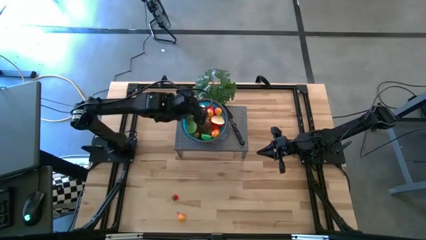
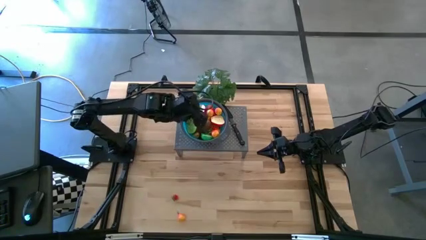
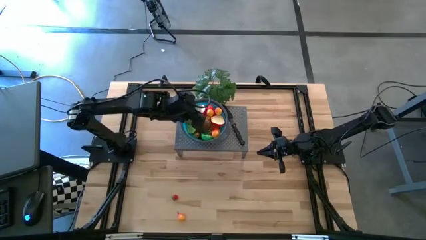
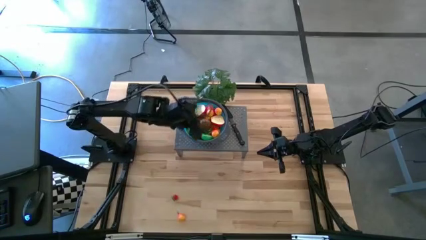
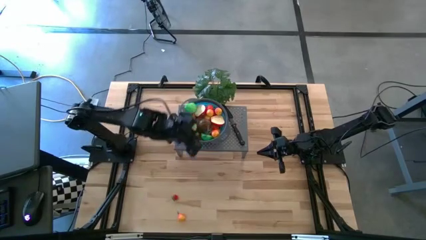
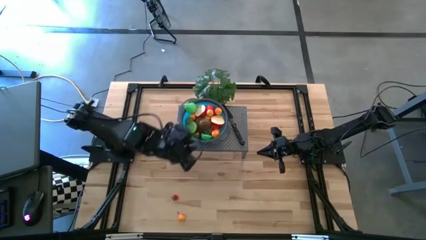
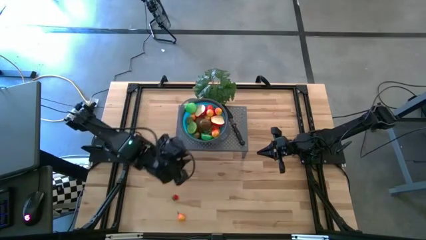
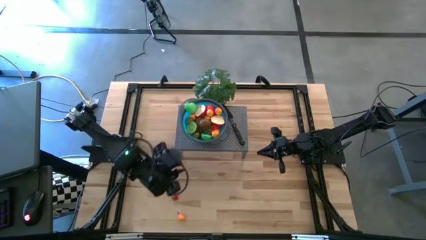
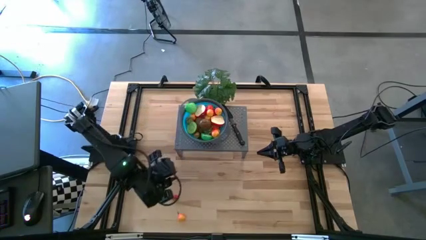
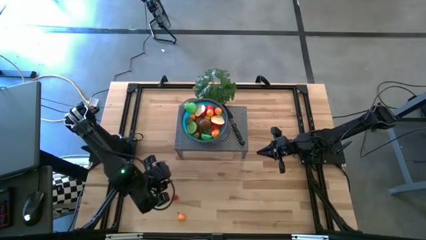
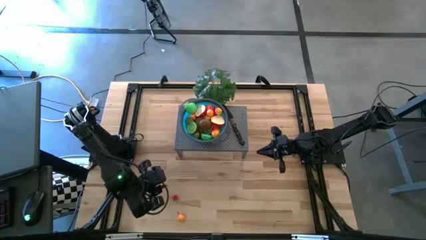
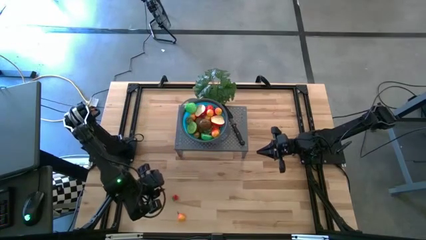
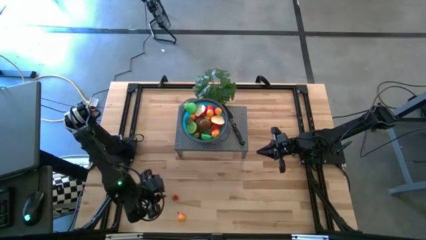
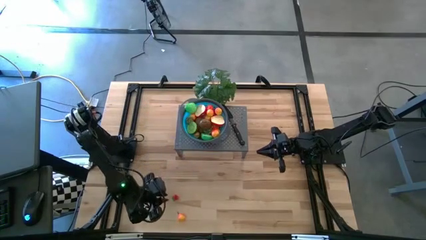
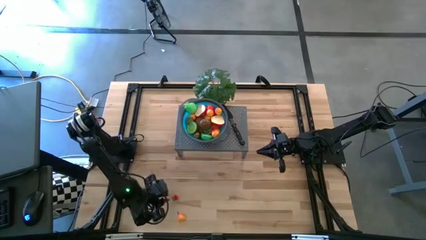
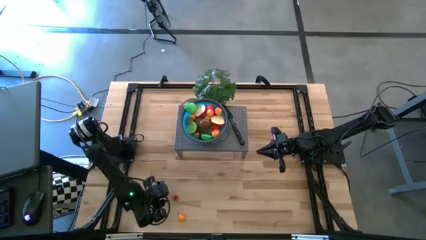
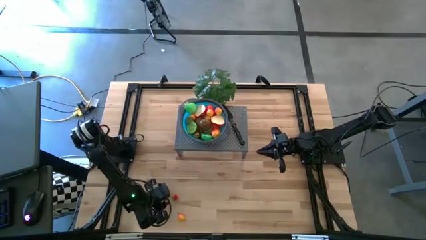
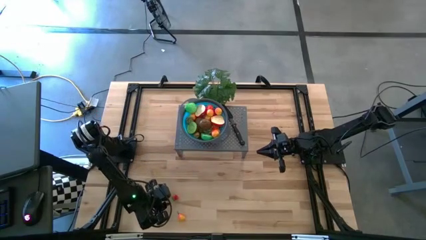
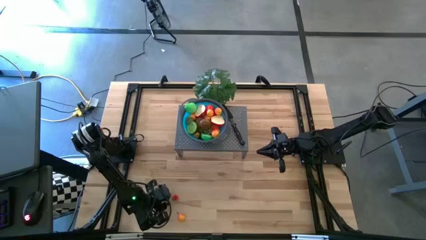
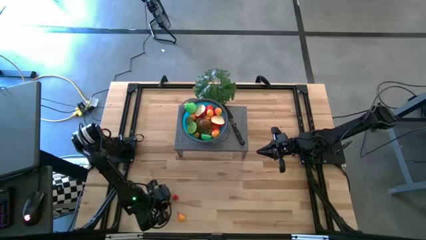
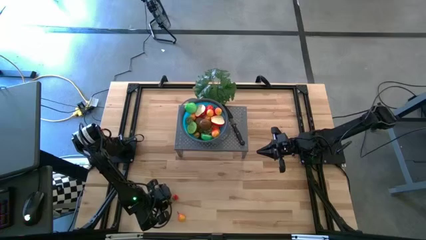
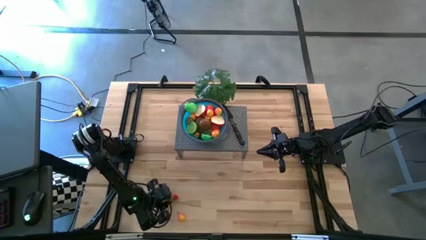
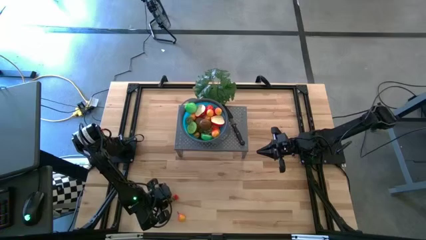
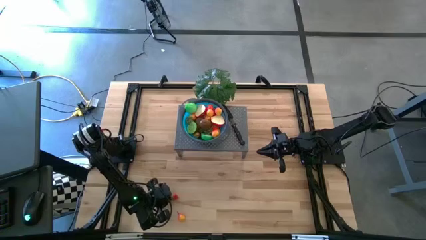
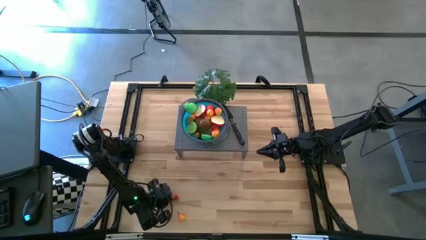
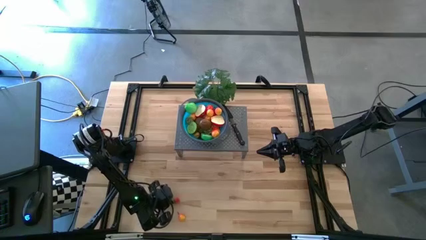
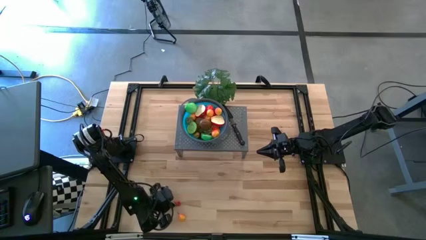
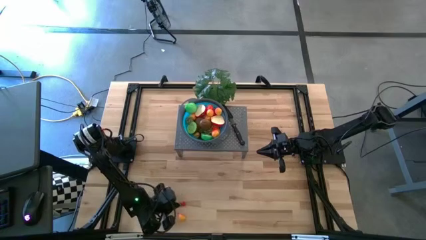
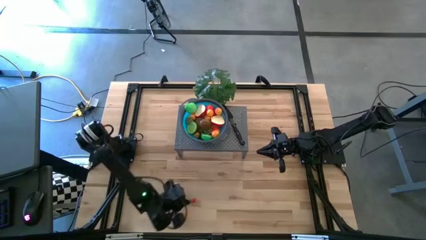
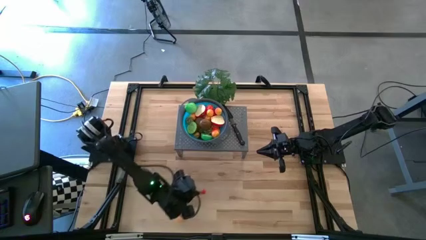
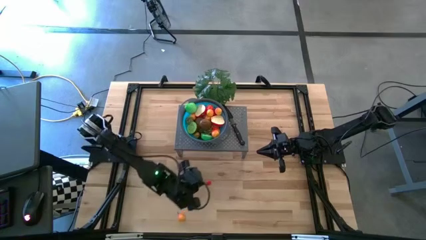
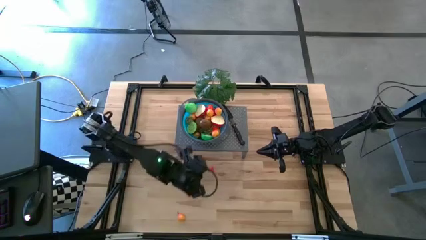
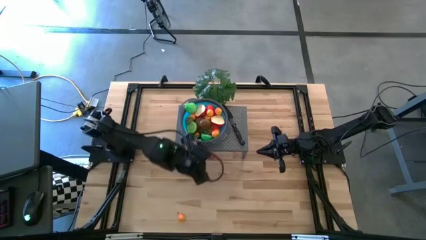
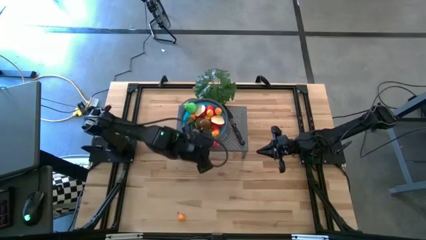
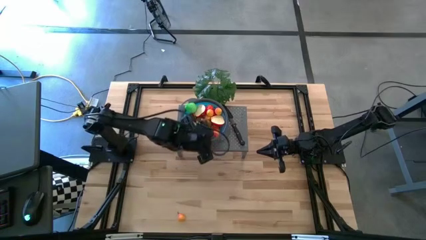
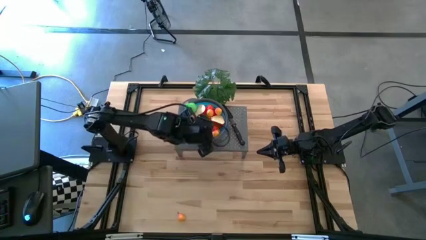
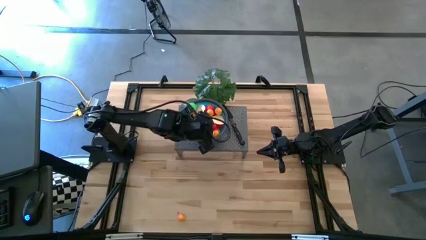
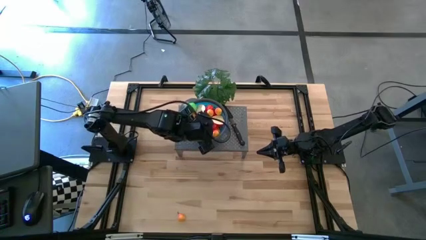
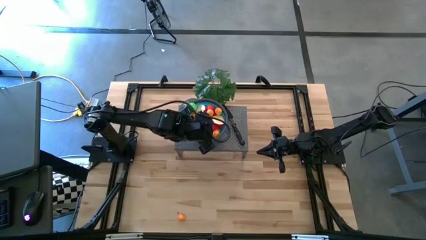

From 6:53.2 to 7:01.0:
Task: Pick & Place Fruit
Put the strawberry into the blue strainer bowl on the shelf

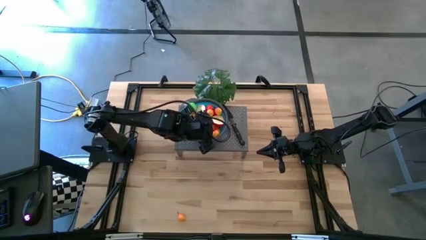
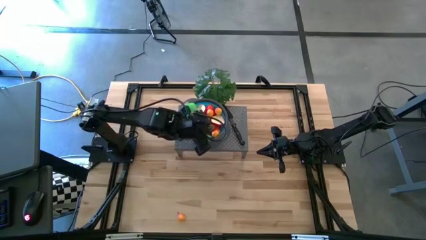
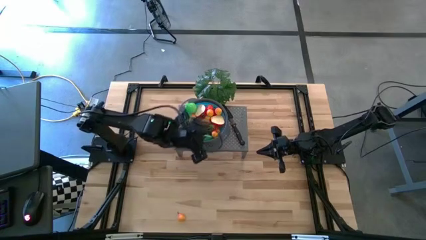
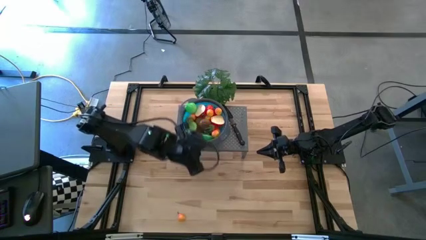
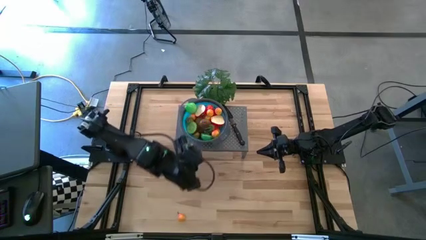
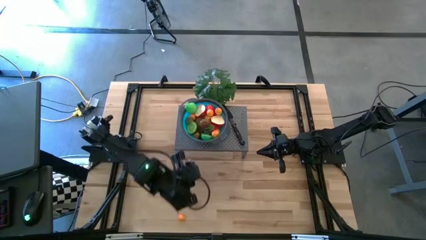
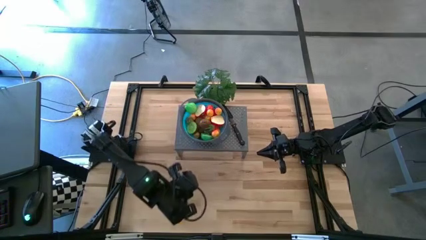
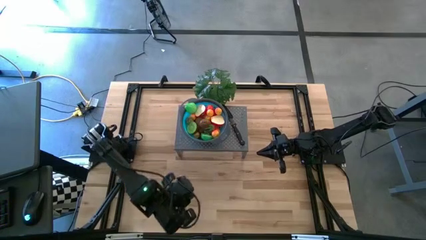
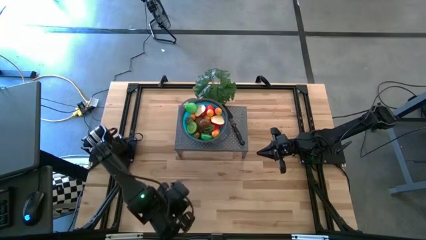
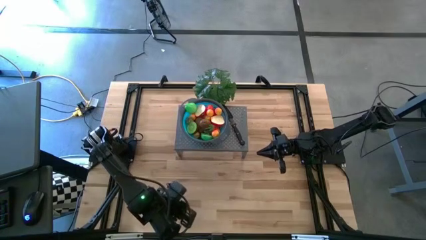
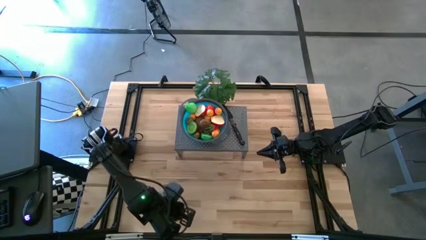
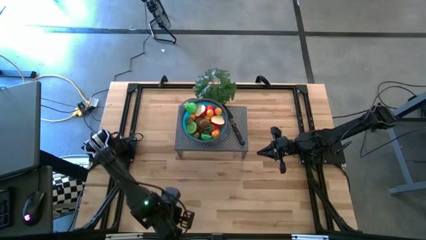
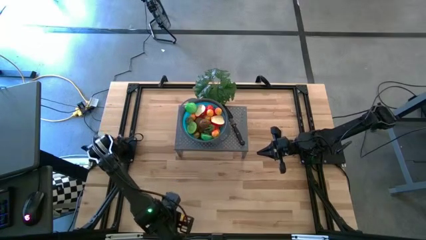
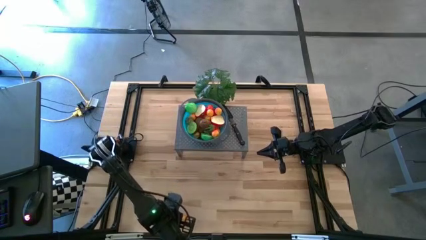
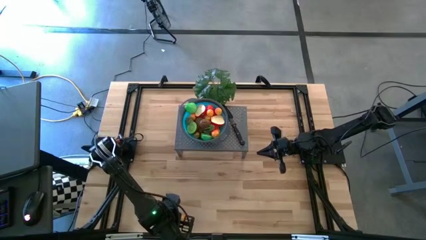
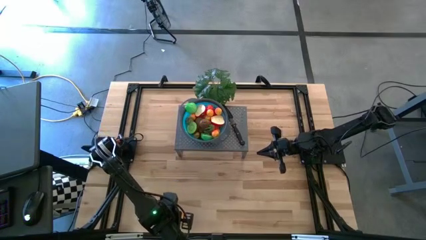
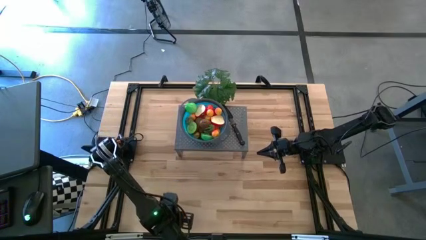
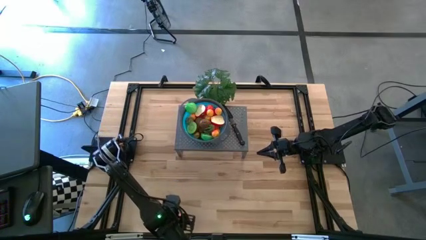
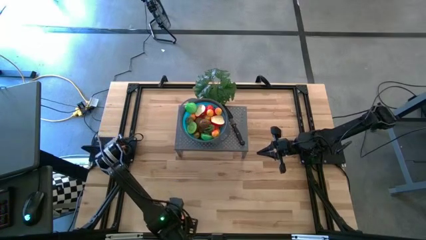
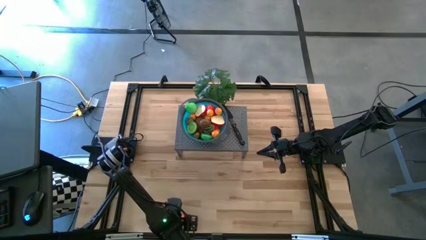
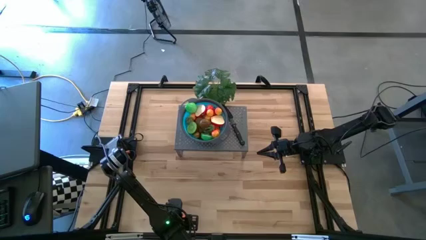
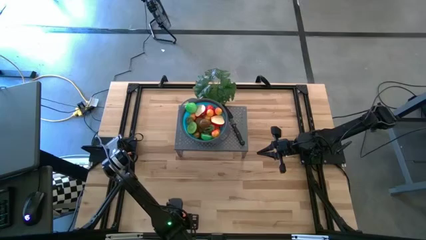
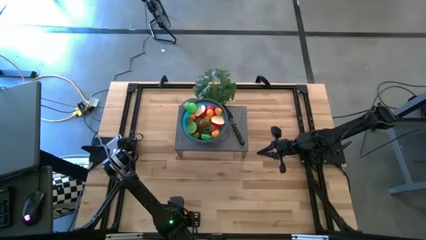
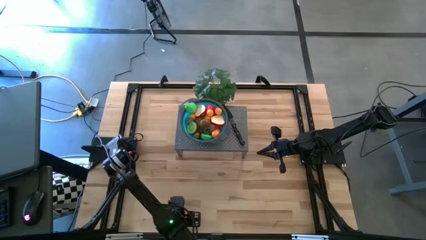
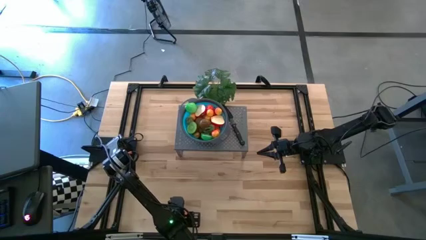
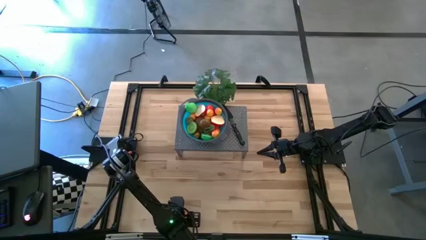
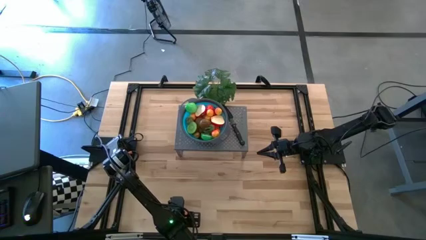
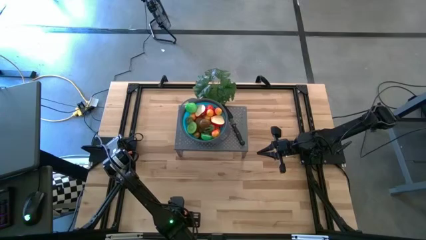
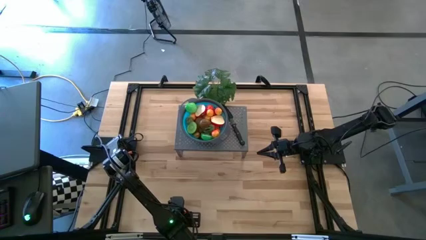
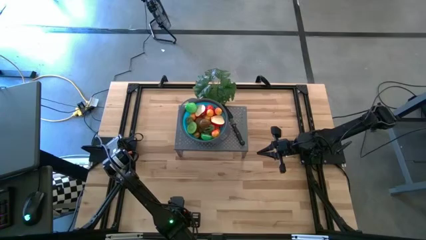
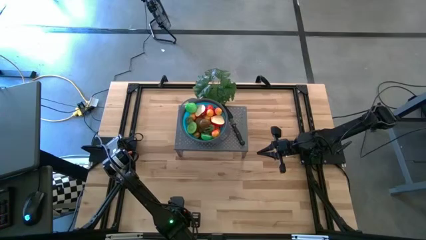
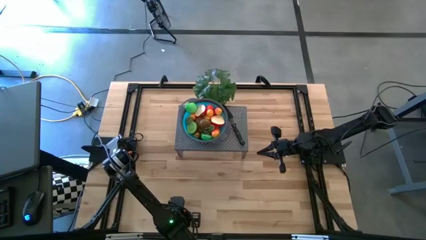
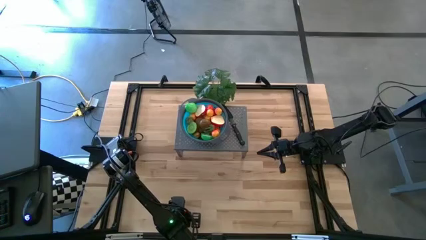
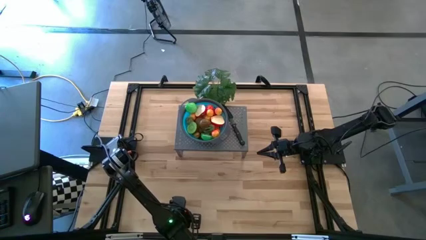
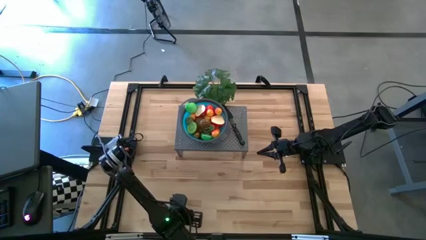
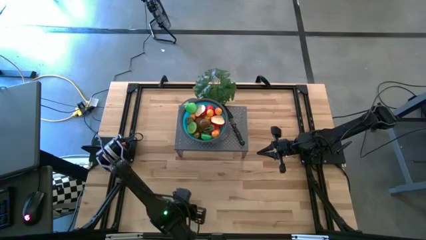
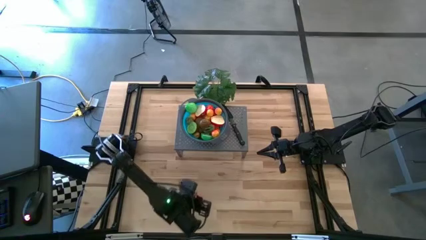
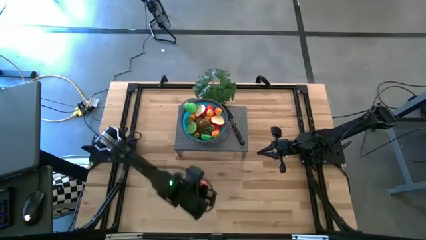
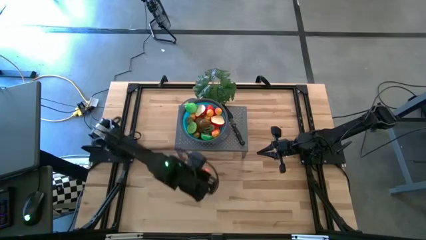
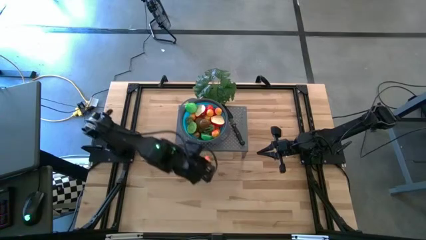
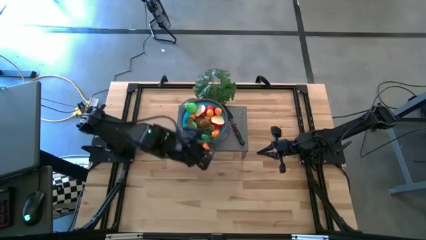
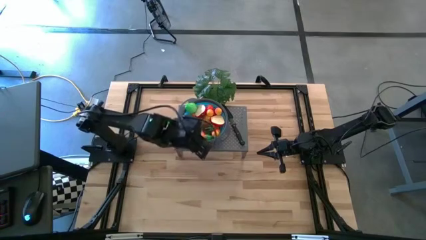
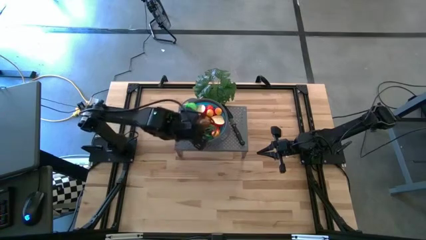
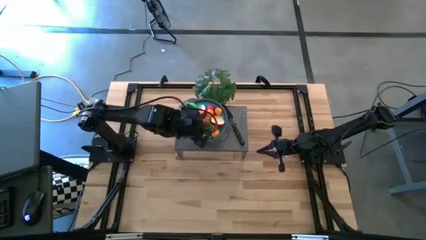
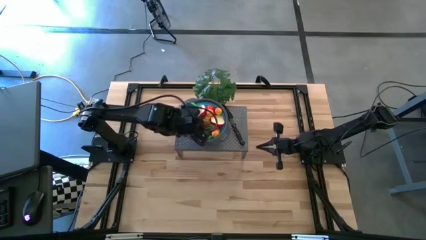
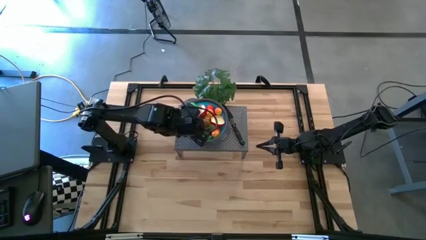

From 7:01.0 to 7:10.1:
Put the pear into the blue strainer bowl on the shelf
